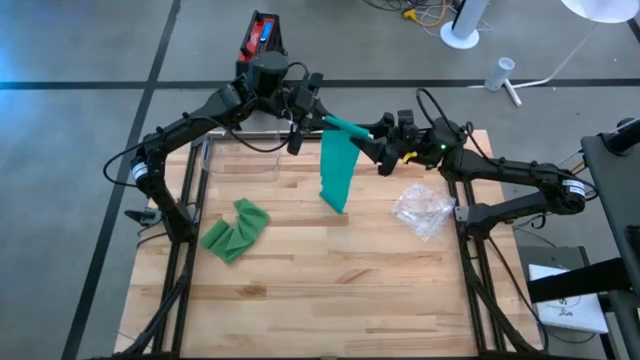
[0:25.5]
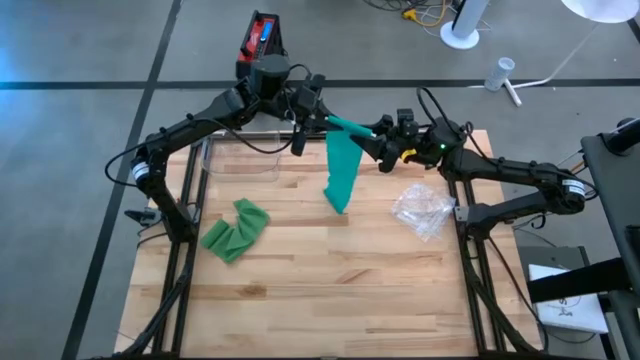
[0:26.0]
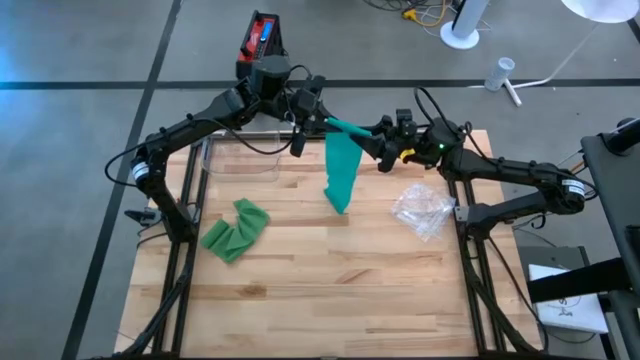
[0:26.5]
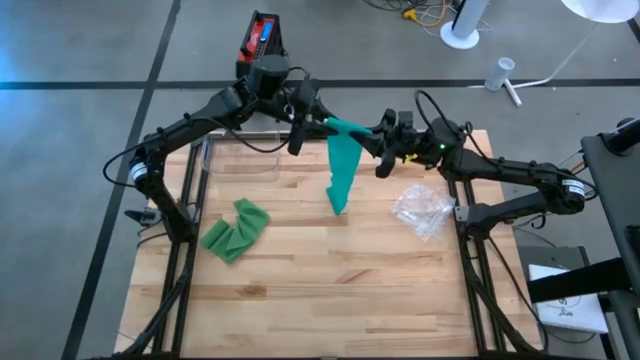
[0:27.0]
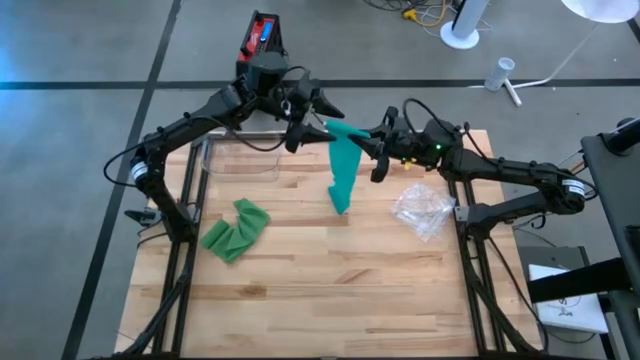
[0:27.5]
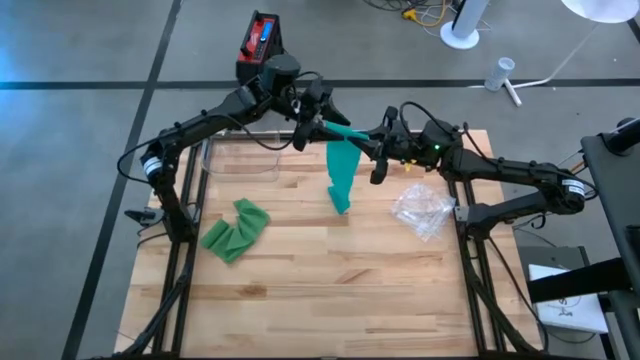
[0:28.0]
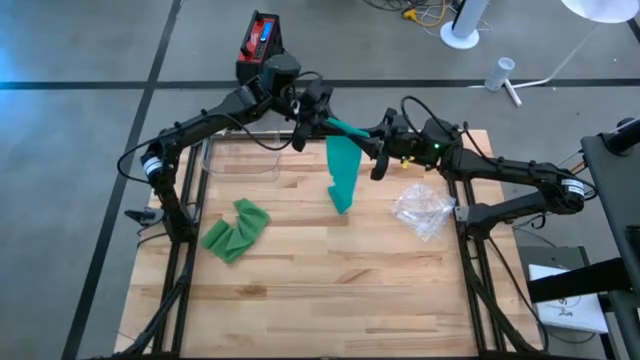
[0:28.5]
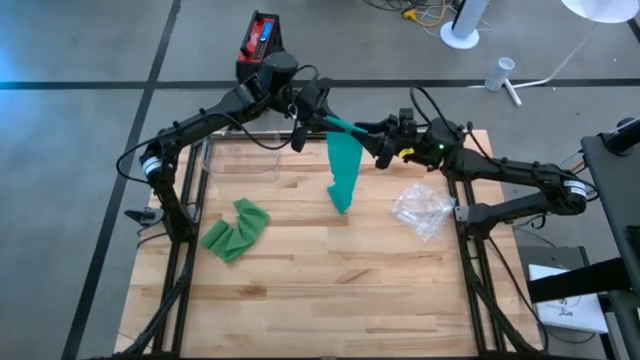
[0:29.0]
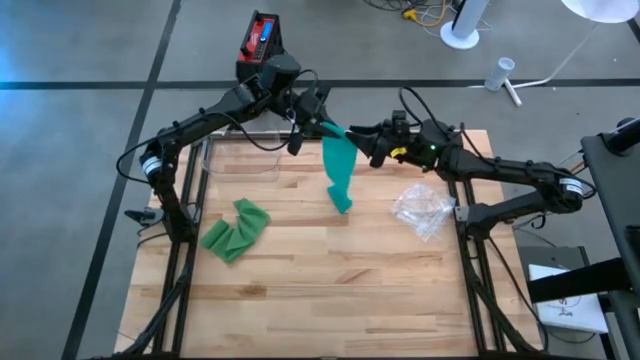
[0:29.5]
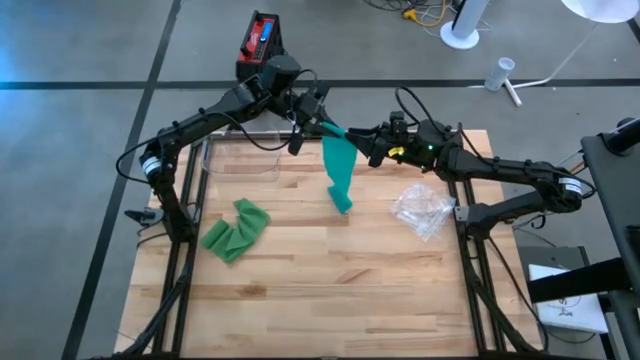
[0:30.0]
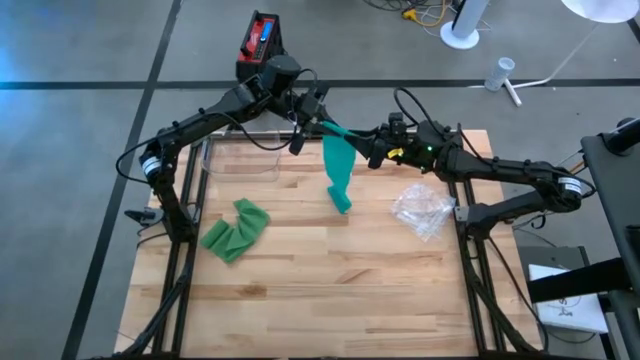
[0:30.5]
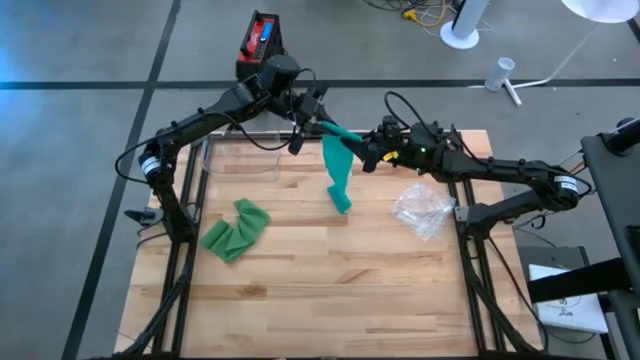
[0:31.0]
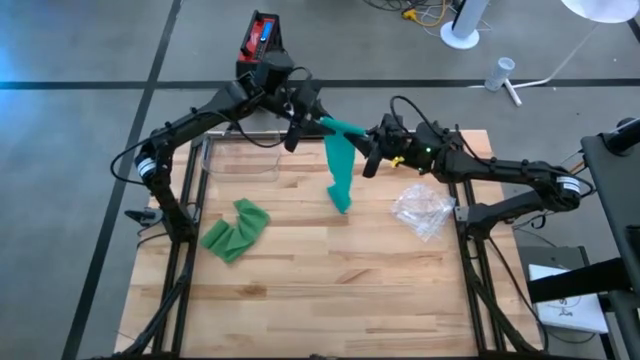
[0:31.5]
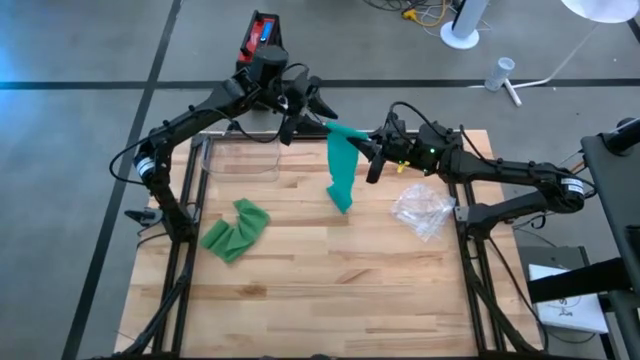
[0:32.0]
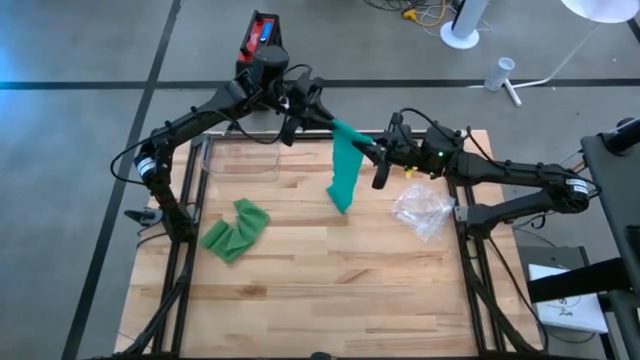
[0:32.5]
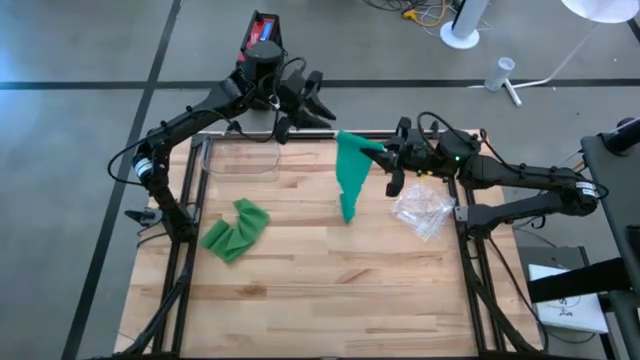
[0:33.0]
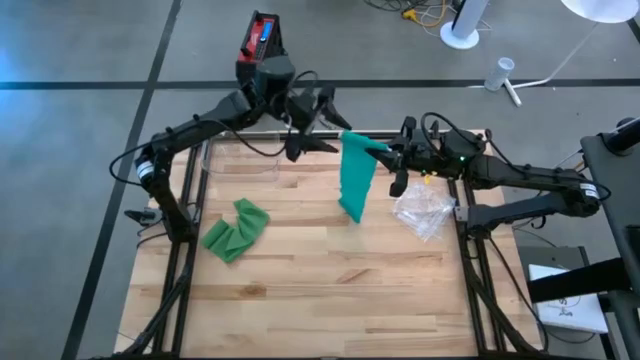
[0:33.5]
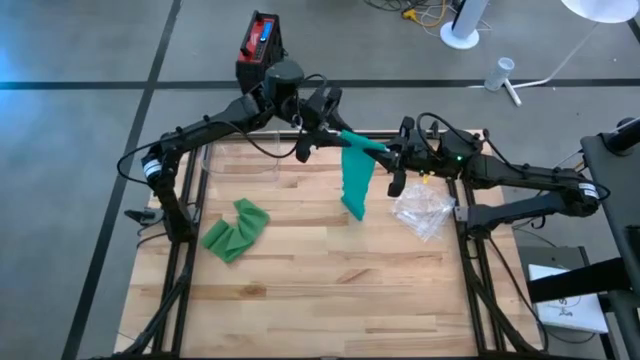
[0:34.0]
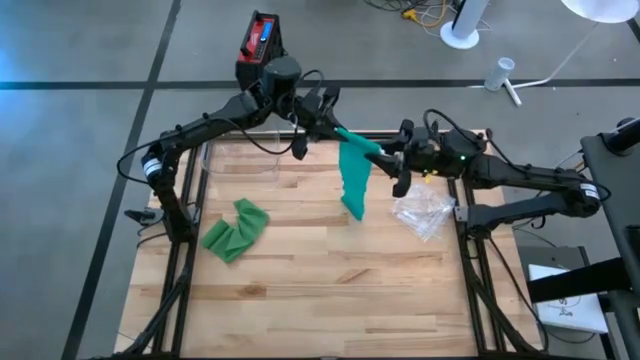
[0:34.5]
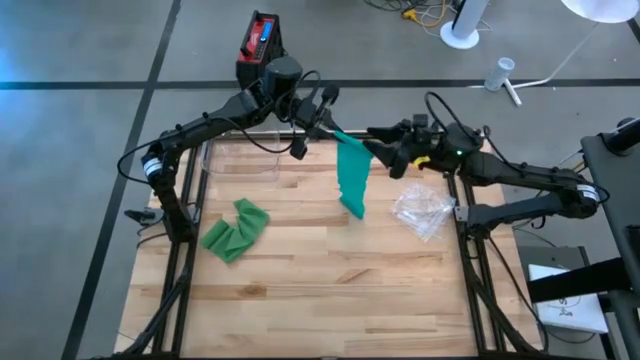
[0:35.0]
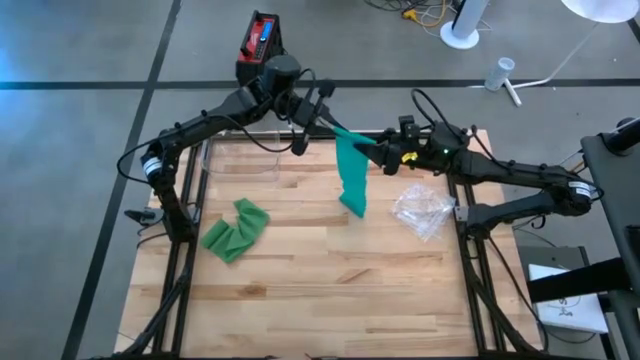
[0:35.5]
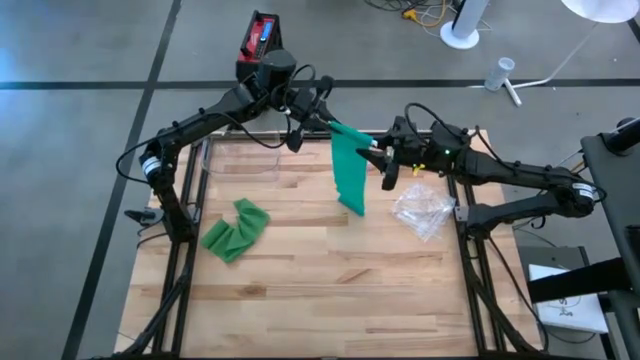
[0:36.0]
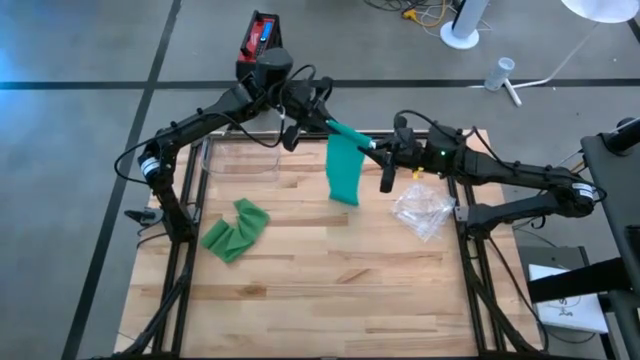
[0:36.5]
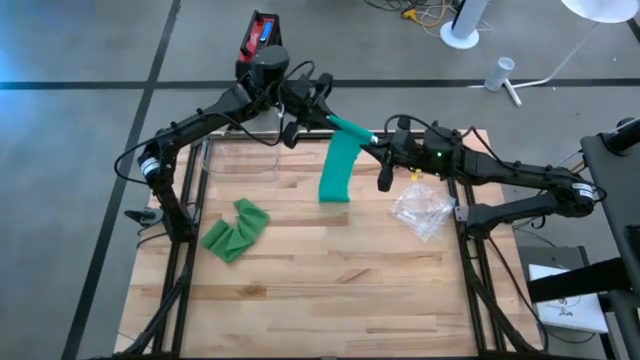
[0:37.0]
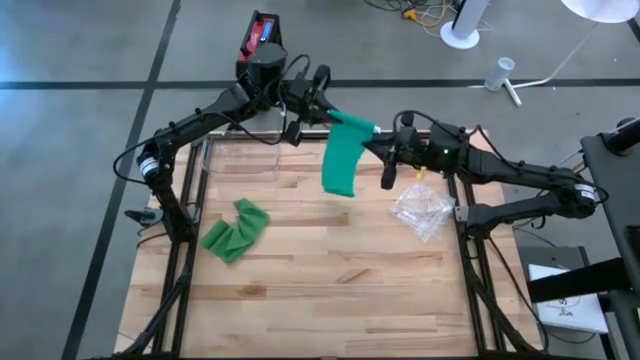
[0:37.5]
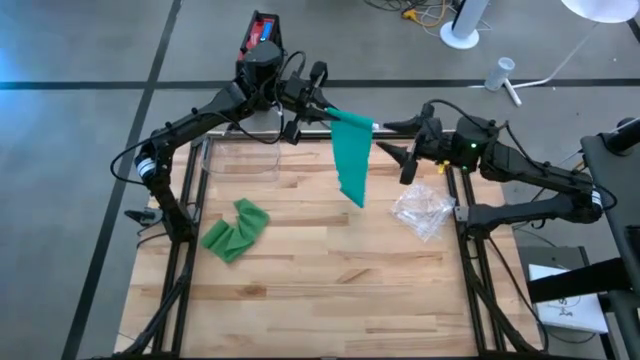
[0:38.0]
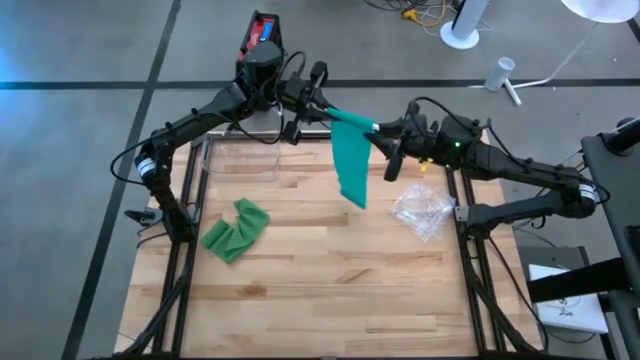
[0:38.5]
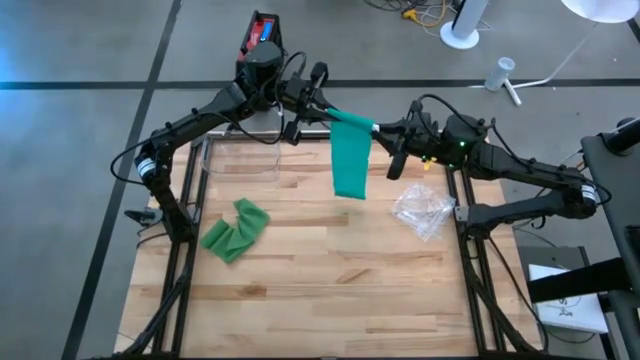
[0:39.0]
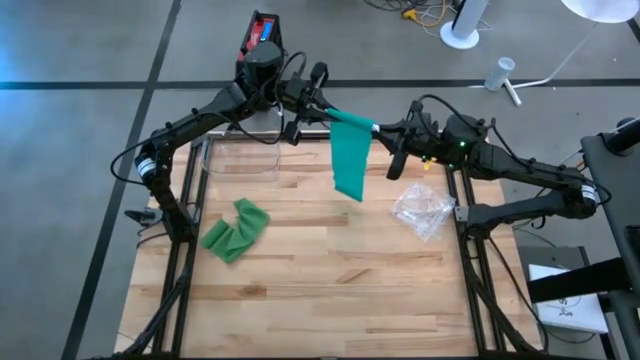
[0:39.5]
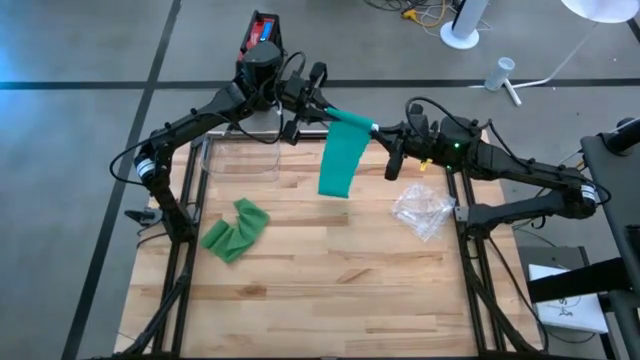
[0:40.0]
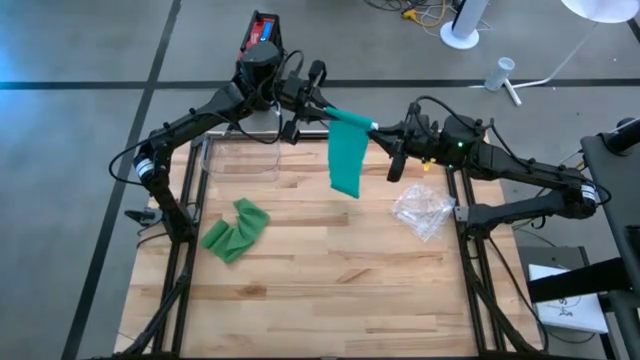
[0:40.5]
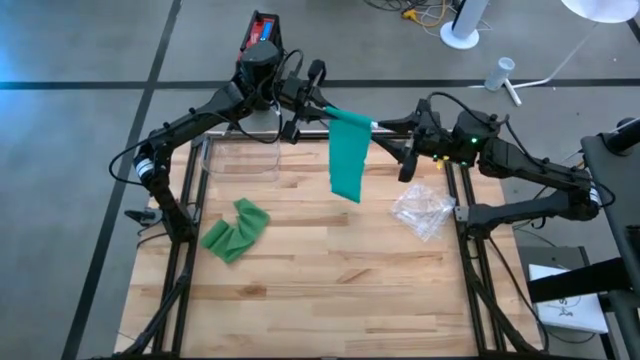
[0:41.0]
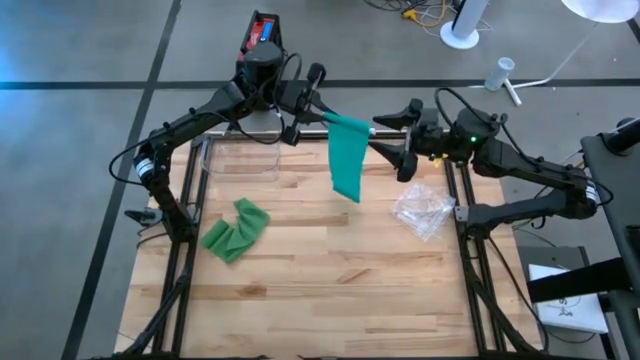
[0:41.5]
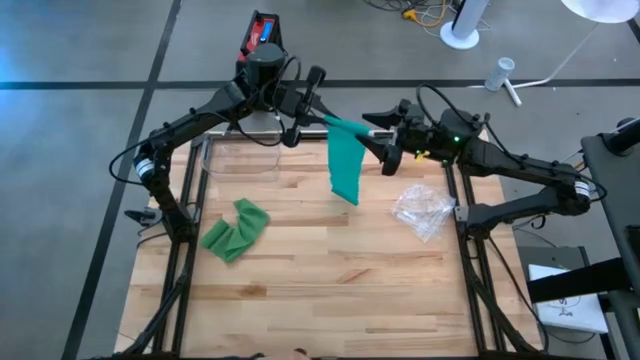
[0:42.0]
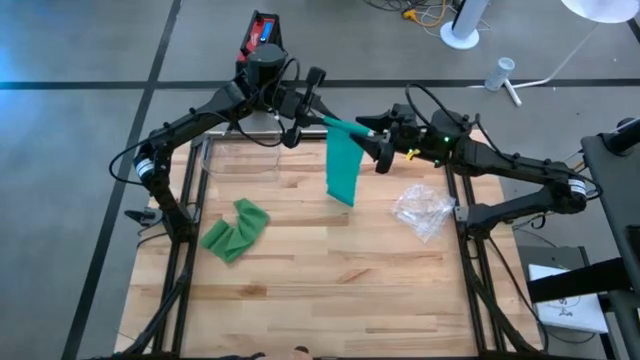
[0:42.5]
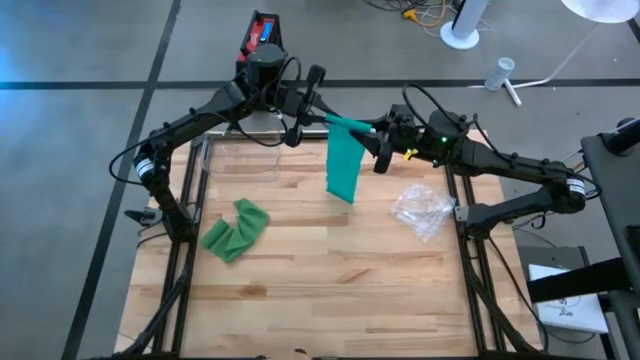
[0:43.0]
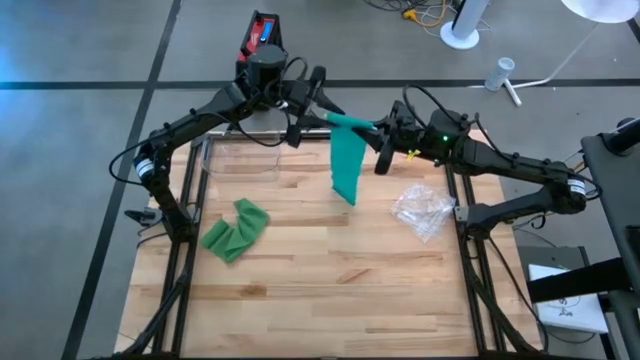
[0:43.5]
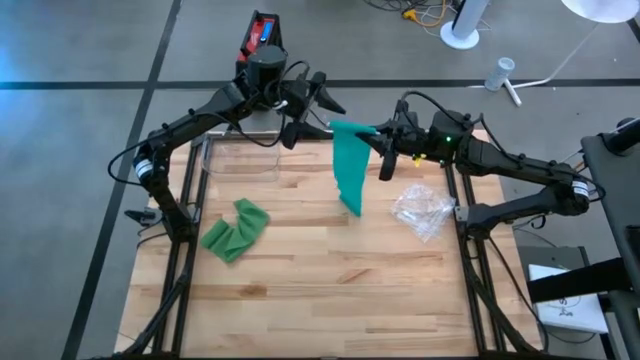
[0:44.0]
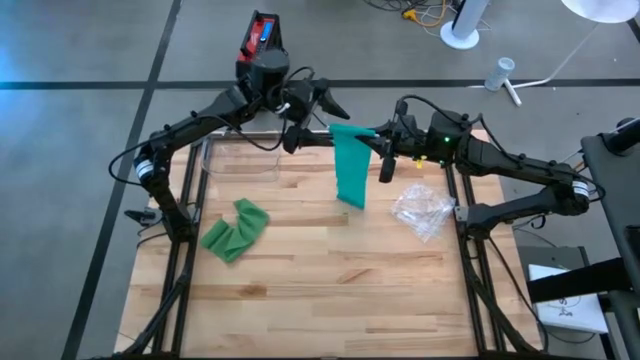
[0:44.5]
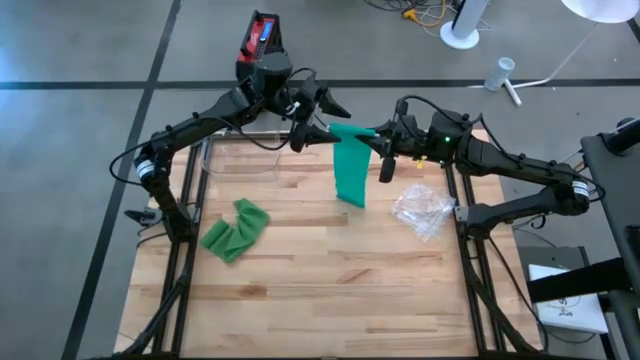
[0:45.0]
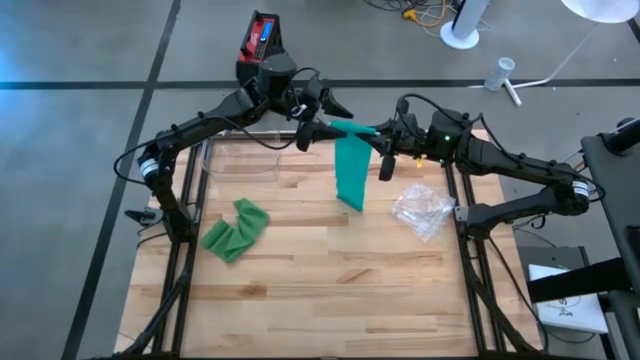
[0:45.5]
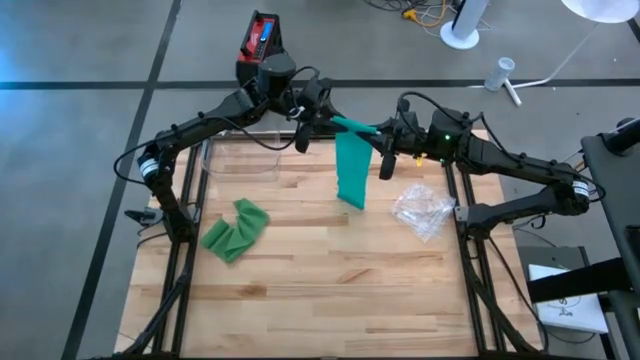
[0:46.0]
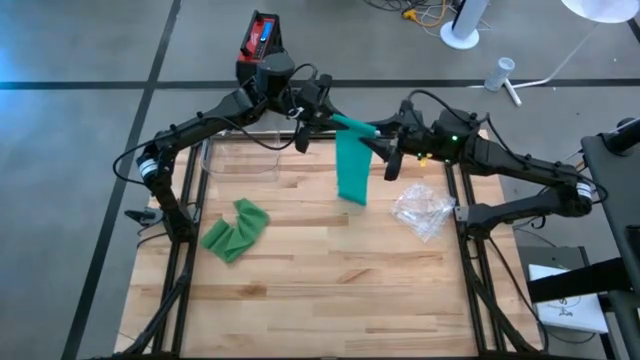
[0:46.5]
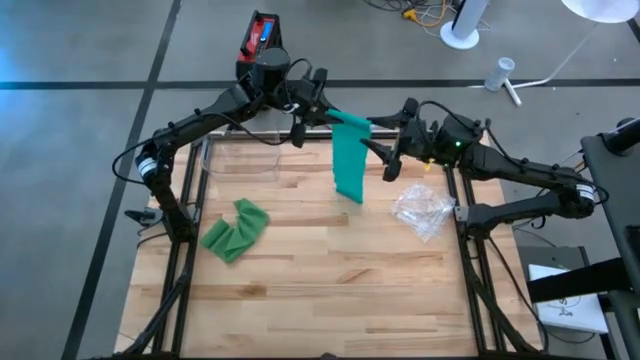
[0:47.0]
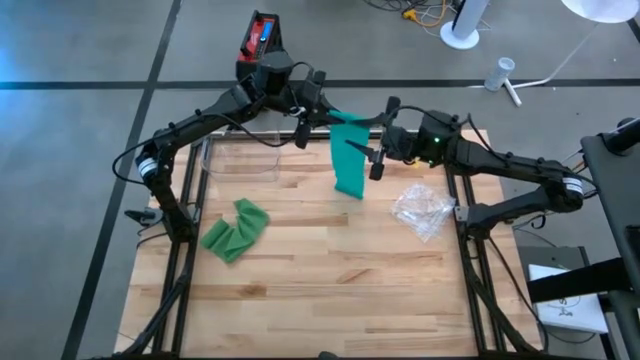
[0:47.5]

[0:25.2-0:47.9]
Task: Roll bandage
Roll the blue bandage
